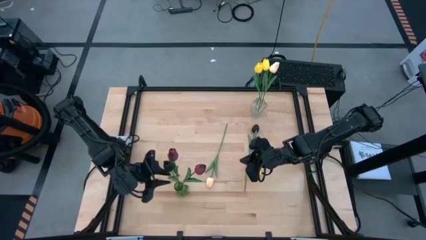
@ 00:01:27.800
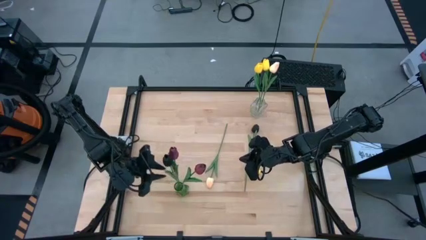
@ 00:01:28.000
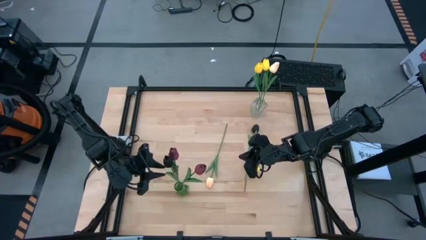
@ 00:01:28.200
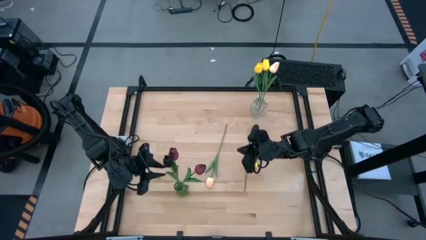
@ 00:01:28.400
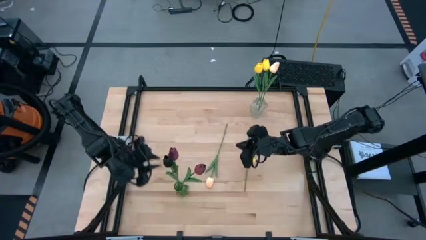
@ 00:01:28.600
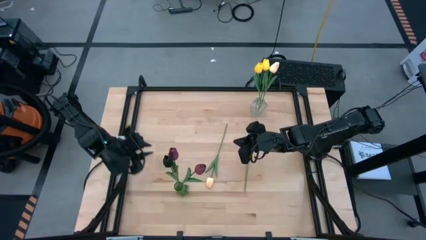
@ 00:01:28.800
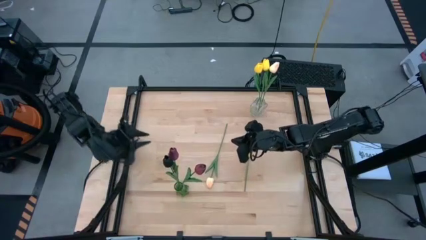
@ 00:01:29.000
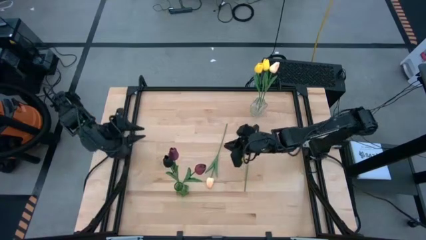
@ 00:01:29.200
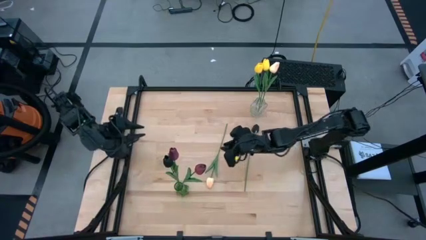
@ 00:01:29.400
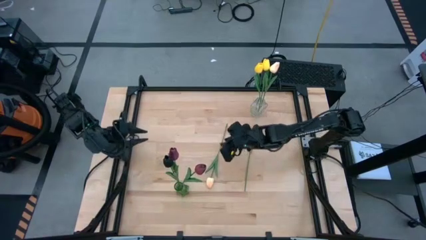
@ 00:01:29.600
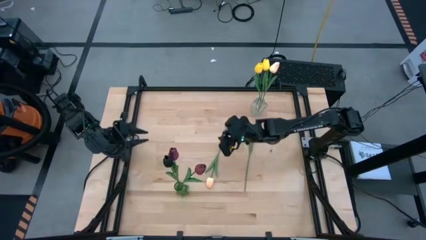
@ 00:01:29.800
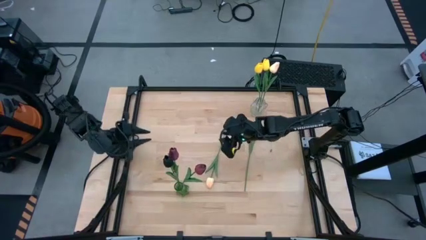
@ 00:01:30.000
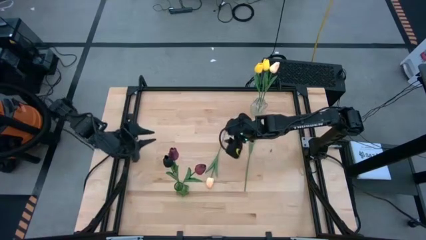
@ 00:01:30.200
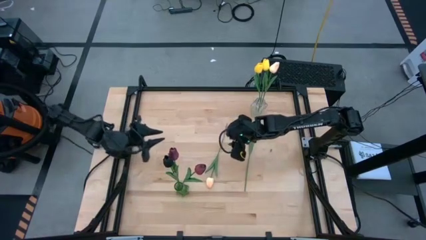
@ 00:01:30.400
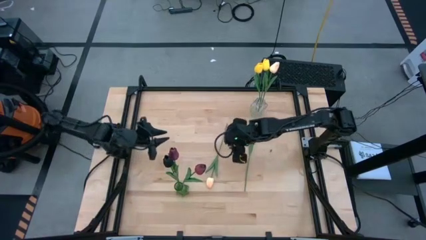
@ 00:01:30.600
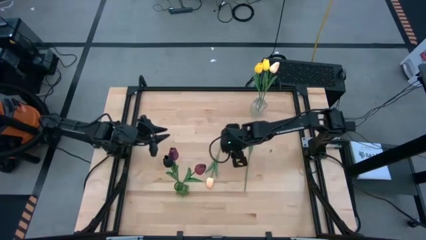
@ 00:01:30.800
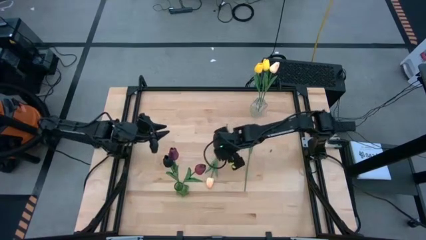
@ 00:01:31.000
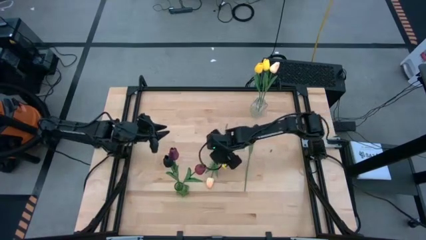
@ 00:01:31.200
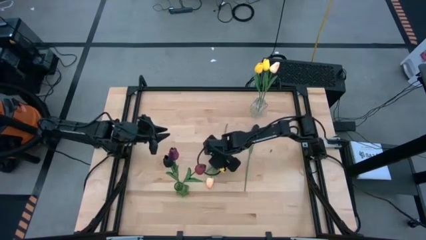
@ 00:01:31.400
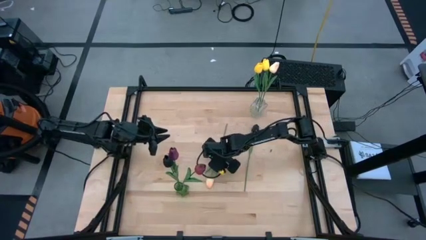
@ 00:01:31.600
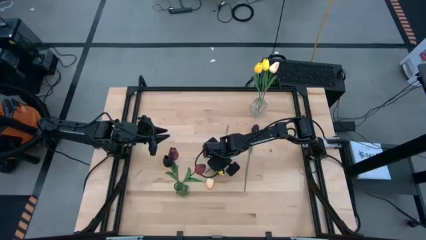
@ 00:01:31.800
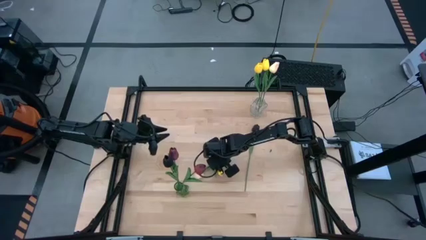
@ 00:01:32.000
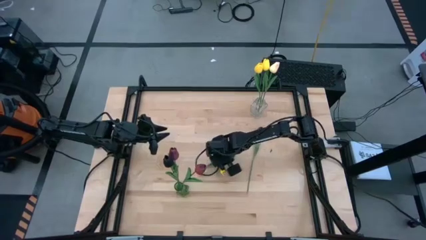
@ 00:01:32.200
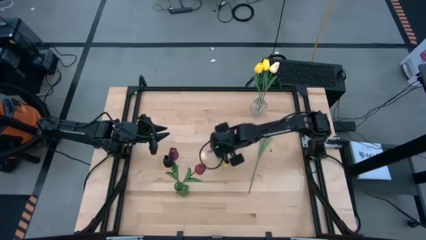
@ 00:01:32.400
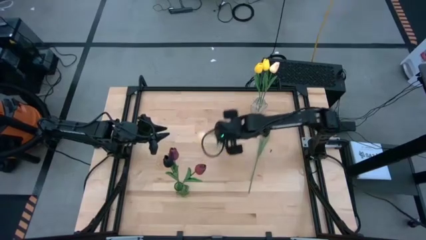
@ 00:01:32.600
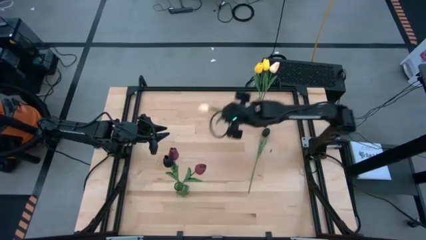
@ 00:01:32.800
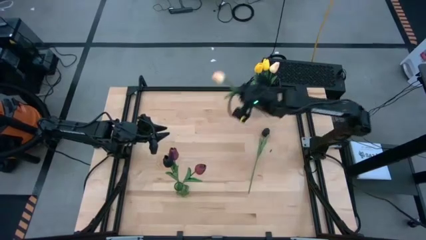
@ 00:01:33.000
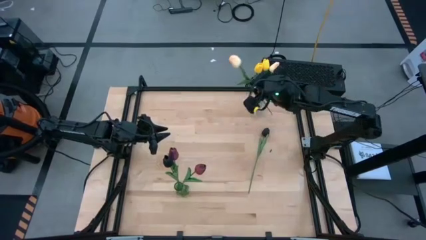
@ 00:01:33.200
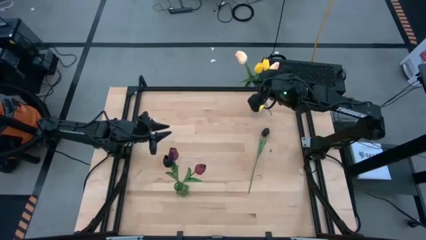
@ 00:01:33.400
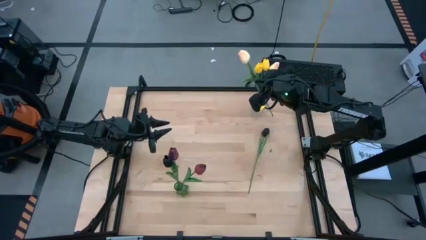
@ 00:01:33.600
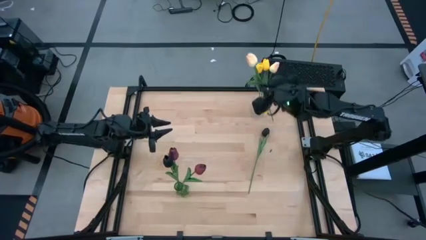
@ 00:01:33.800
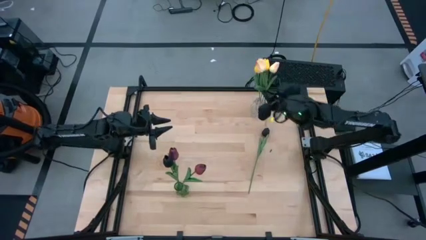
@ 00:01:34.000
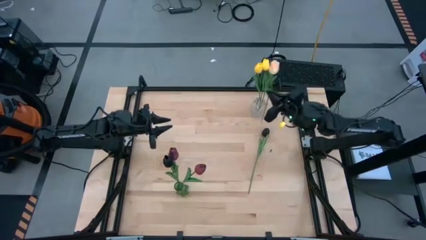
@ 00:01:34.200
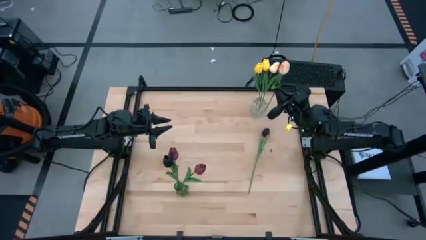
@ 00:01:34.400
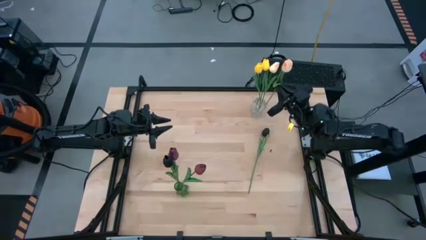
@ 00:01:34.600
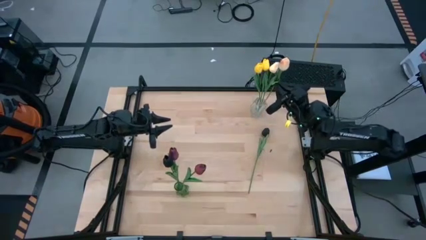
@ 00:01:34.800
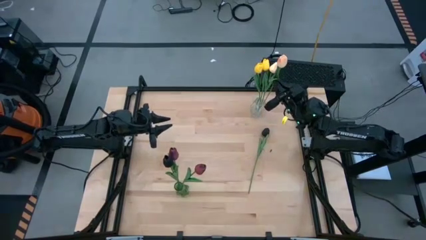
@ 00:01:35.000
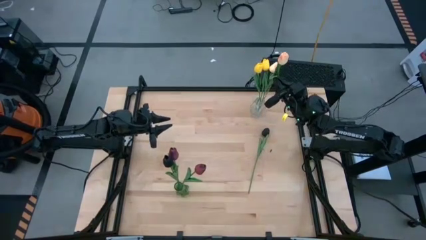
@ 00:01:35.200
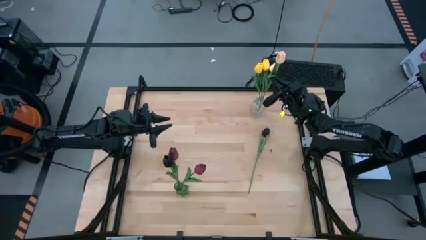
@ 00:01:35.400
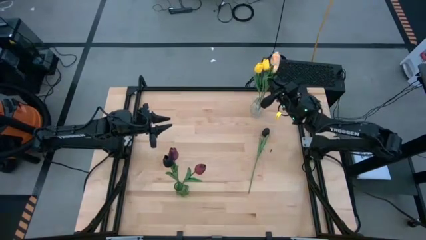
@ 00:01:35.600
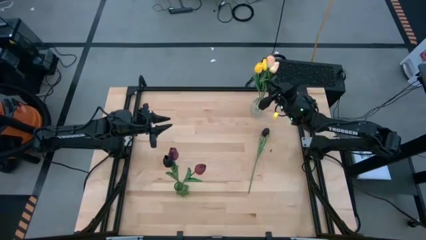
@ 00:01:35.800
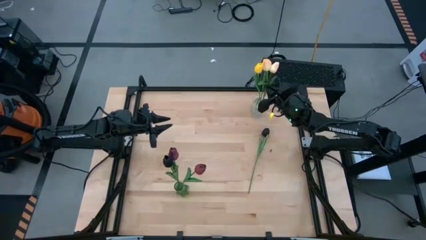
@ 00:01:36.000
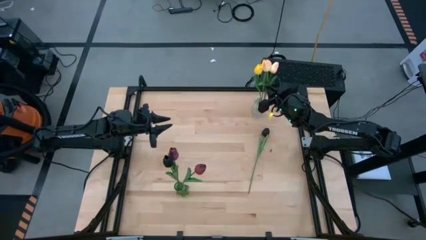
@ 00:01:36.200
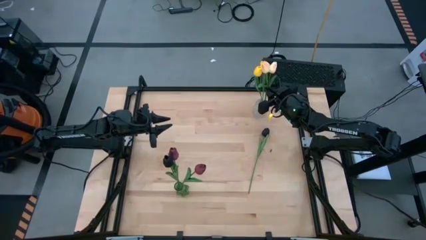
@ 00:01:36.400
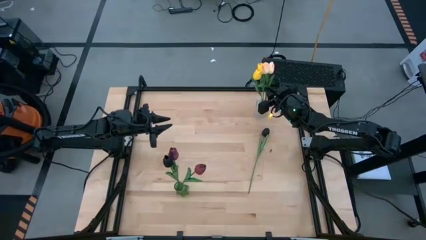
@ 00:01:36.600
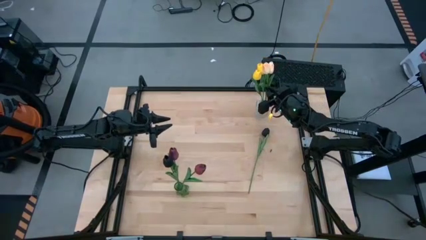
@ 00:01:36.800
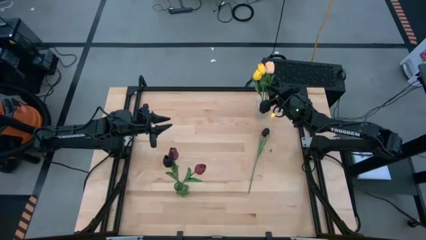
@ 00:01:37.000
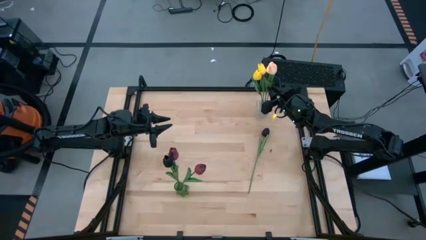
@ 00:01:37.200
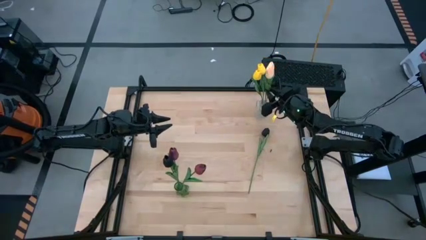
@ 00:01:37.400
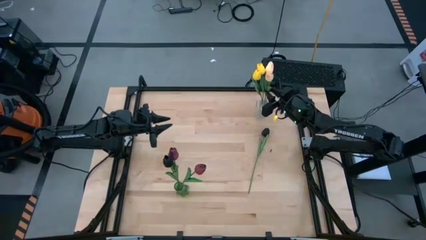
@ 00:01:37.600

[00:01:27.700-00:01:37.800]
Task: Sort flowers into vase by color
Put the light orange flower into the vase

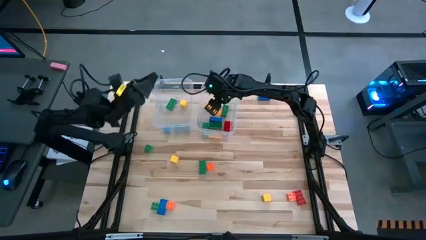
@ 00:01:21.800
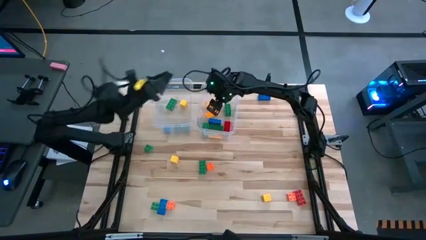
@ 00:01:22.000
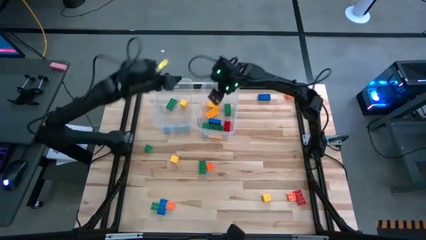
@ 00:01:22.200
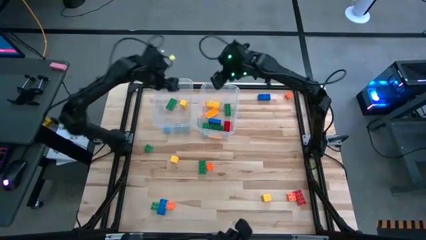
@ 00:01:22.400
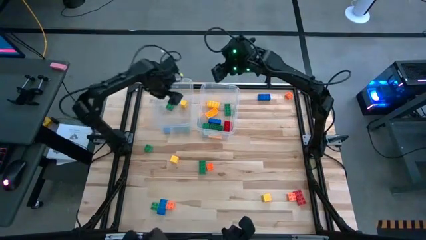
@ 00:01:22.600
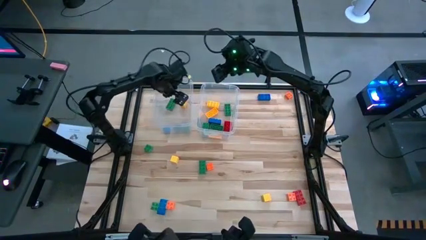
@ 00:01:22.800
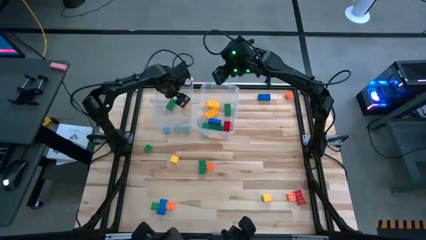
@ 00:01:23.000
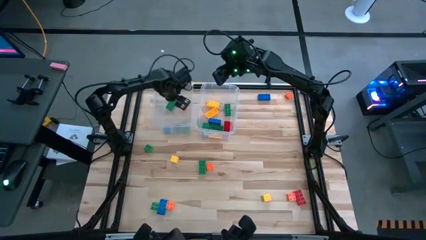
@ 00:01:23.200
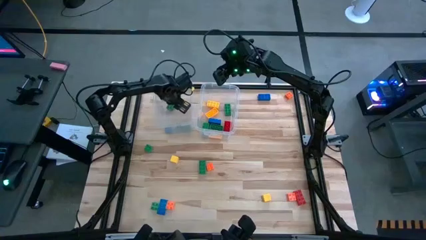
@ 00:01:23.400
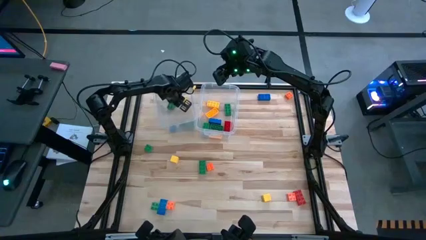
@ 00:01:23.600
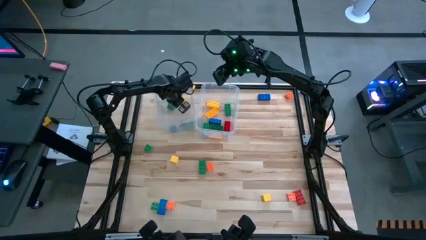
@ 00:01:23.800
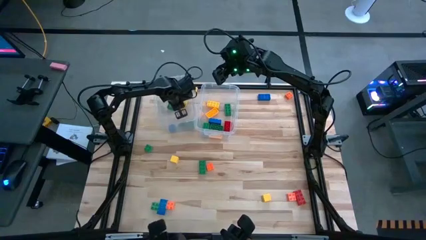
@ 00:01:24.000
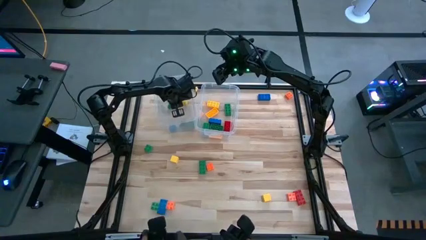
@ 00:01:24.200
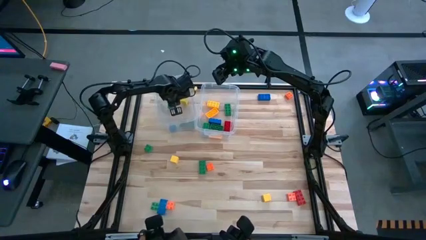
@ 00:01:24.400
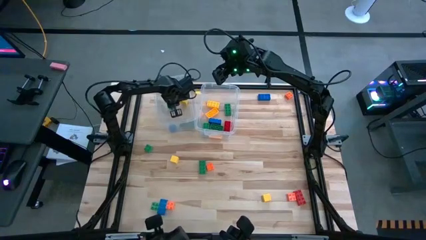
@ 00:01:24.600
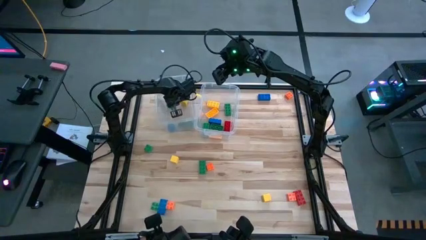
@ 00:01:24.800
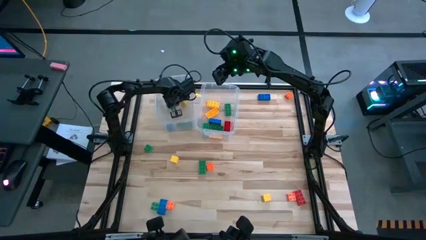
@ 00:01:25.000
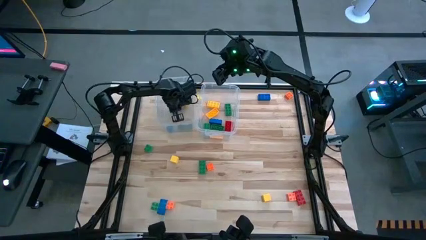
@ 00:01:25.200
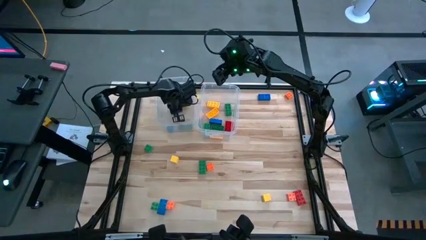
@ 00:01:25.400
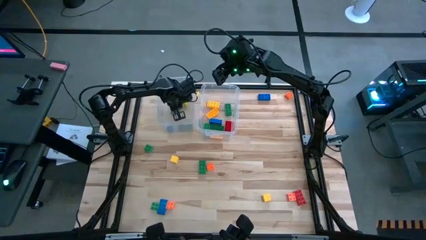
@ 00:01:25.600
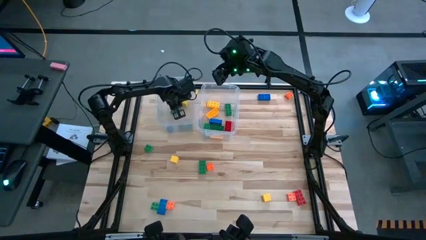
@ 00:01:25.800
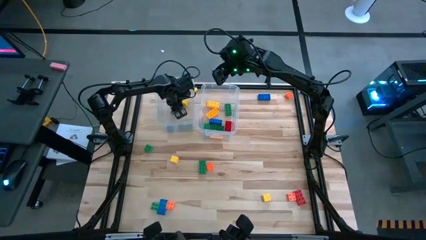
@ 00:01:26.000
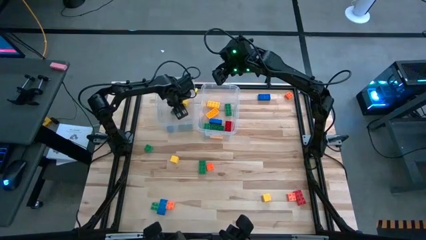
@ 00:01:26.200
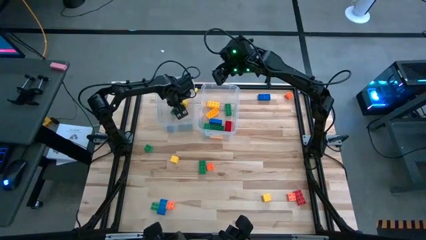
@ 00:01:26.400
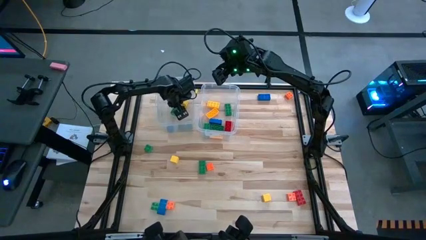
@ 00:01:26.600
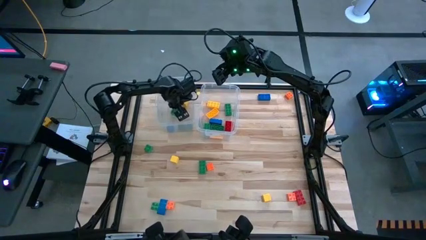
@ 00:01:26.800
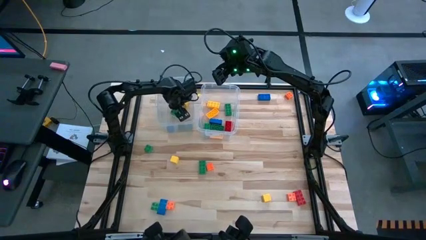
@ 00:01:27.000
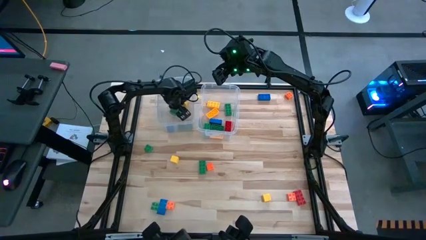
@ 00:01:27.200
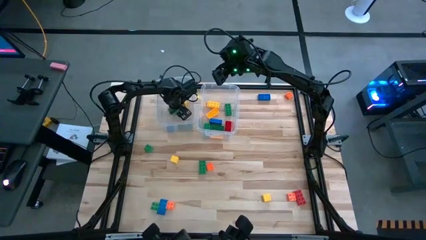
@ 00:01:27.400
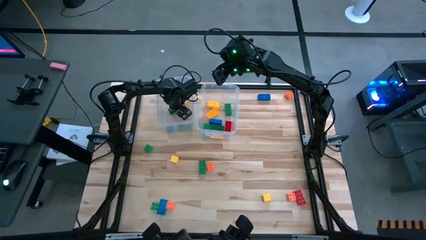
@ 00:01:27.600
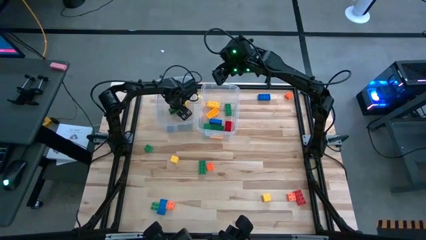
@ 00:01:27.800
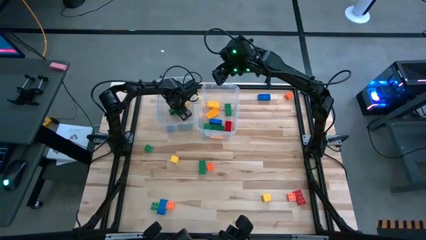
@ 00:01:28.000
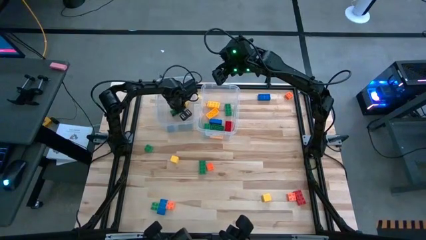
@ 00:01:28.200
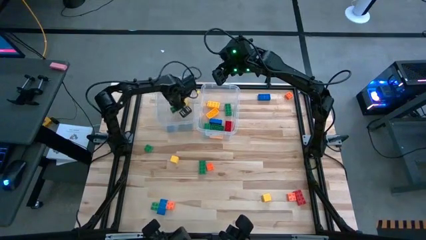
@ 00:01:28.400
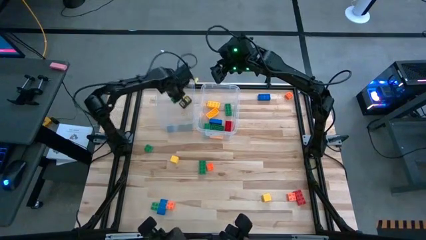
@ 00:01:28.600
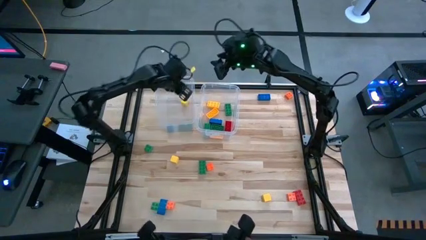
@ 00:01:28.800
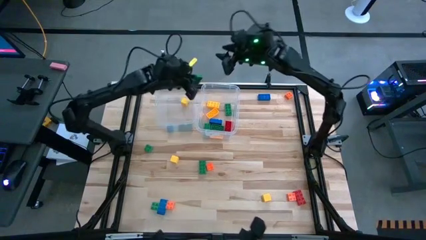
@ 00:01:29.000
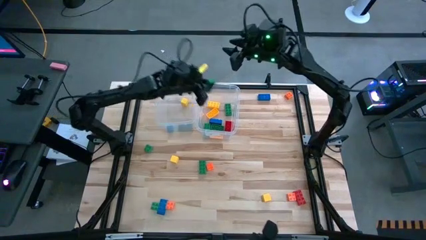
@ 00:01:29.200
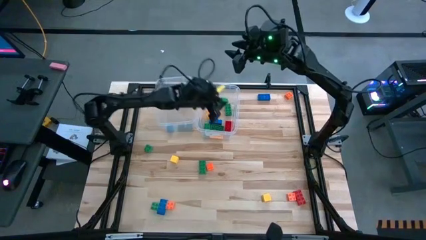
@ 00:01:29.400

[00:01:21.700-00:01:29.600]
Task: Sort blocks by size
Put the green big game piece into the right transparent bin
